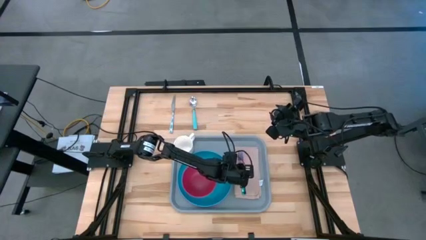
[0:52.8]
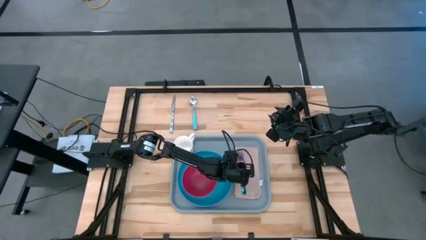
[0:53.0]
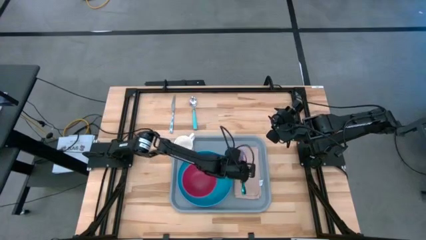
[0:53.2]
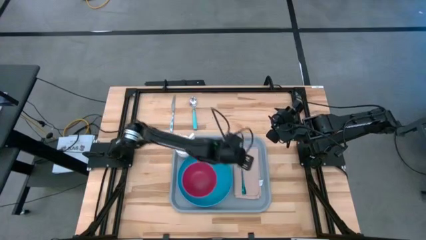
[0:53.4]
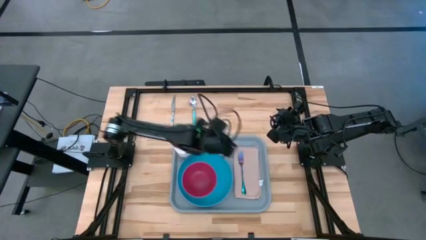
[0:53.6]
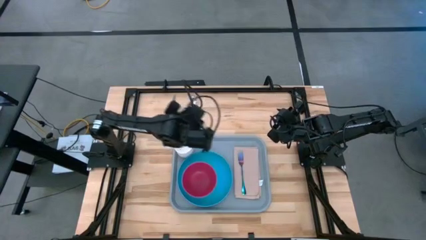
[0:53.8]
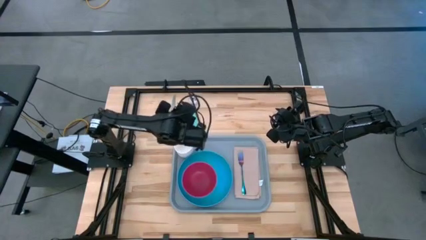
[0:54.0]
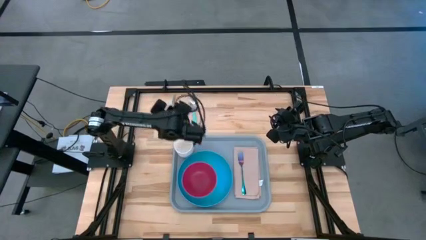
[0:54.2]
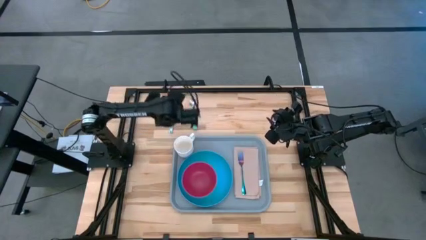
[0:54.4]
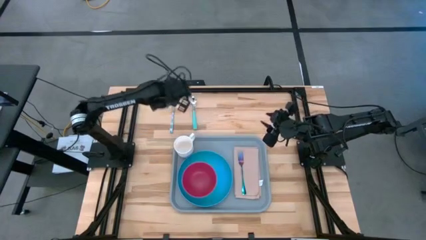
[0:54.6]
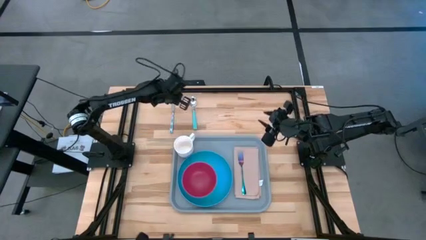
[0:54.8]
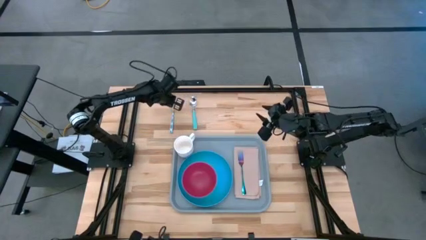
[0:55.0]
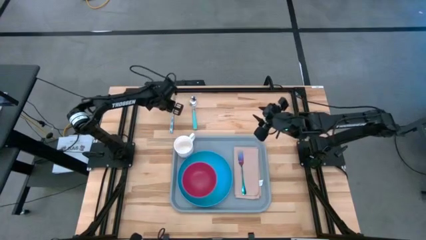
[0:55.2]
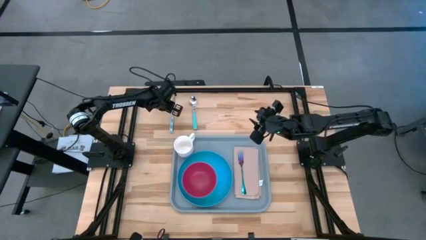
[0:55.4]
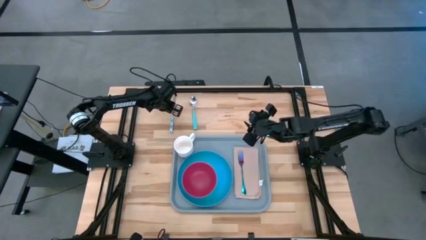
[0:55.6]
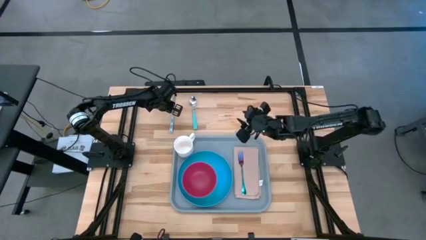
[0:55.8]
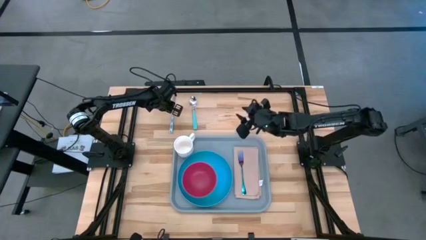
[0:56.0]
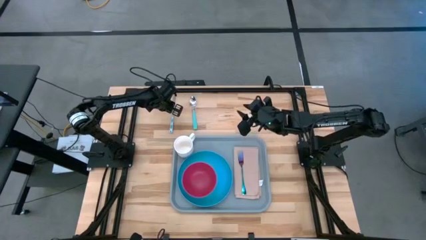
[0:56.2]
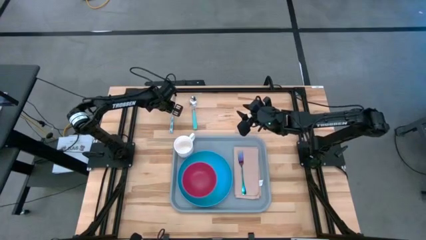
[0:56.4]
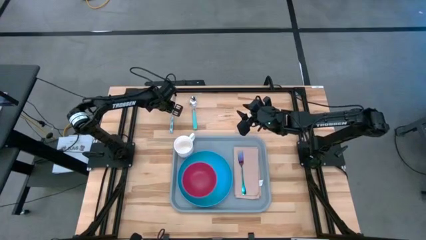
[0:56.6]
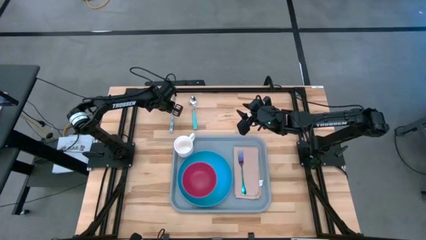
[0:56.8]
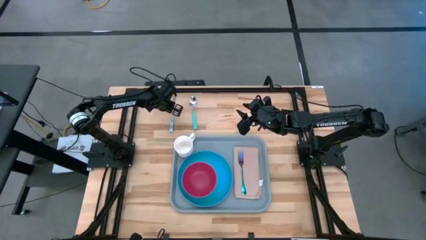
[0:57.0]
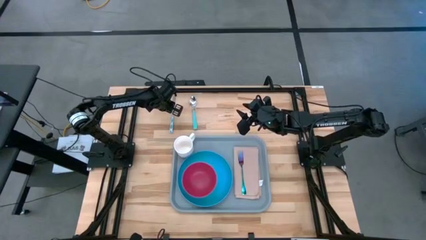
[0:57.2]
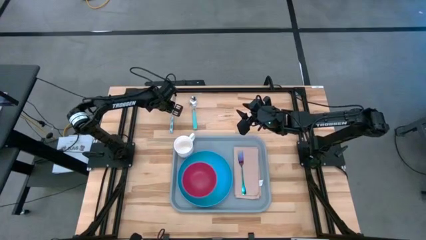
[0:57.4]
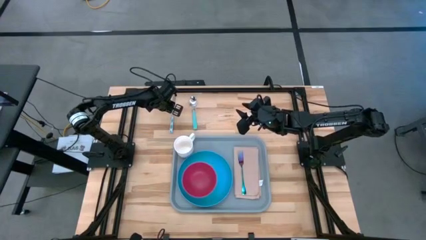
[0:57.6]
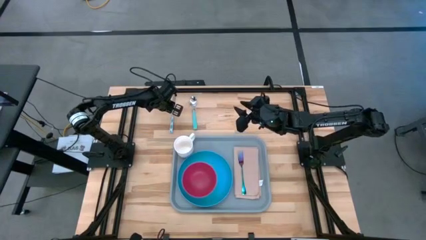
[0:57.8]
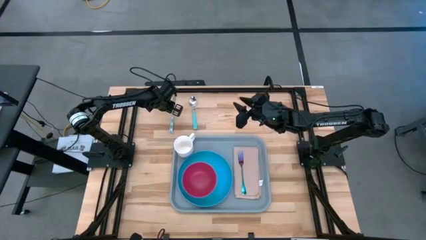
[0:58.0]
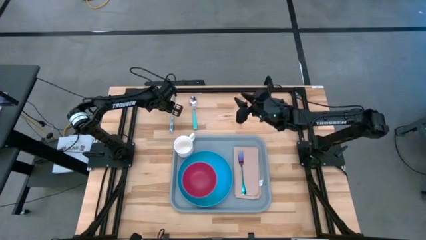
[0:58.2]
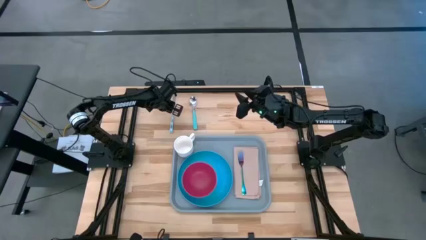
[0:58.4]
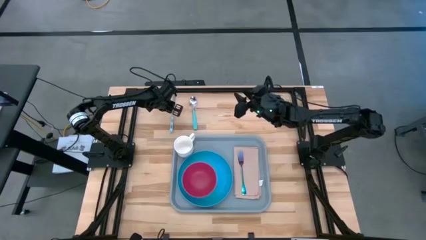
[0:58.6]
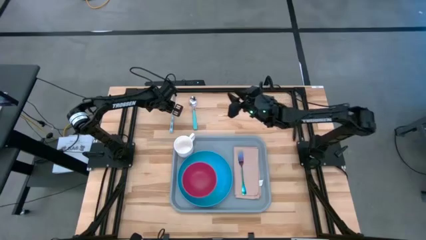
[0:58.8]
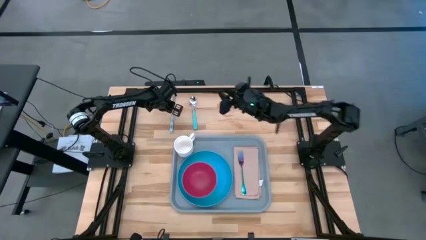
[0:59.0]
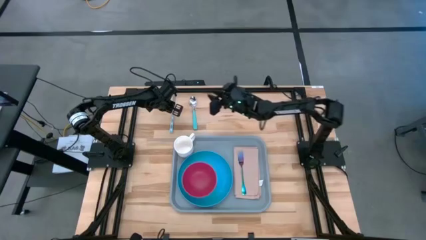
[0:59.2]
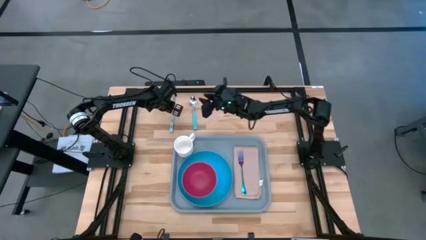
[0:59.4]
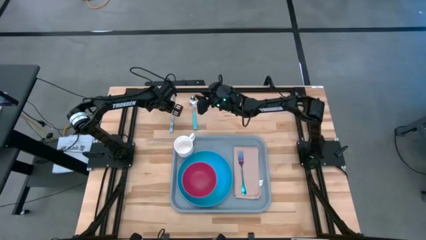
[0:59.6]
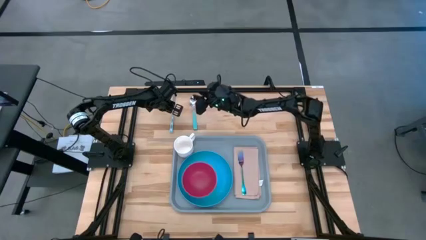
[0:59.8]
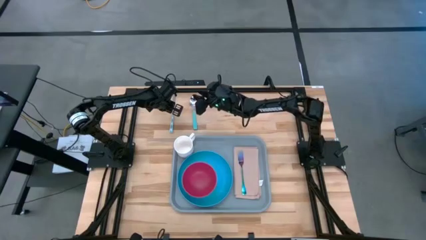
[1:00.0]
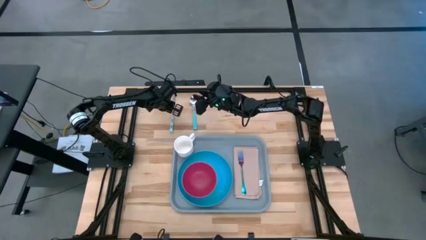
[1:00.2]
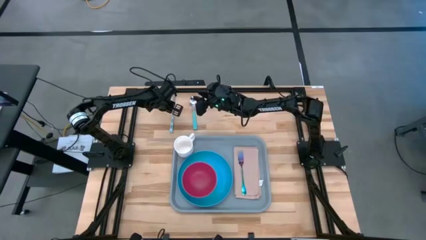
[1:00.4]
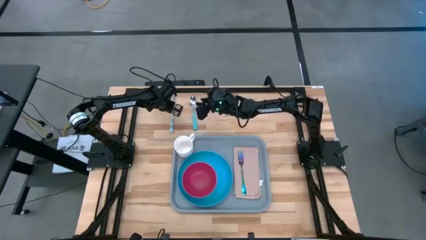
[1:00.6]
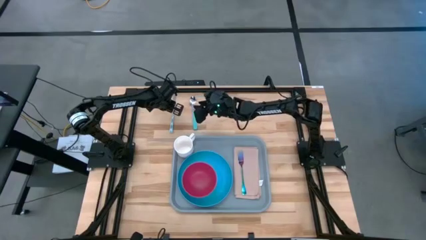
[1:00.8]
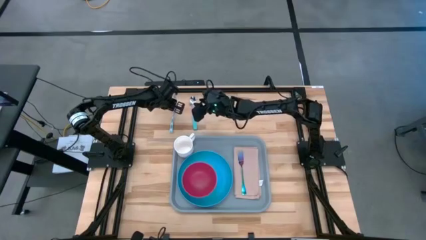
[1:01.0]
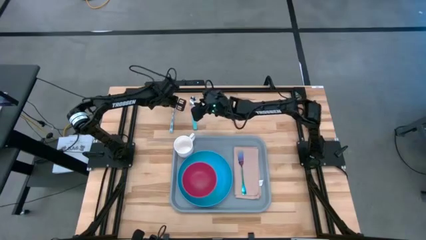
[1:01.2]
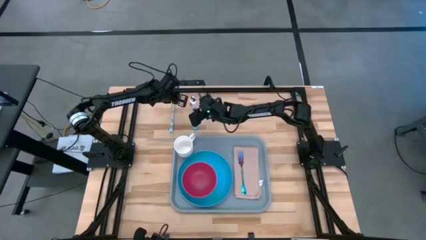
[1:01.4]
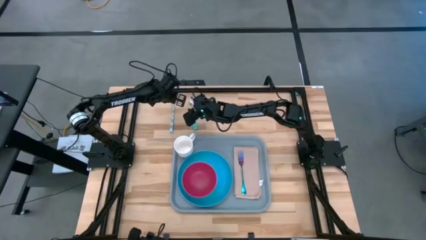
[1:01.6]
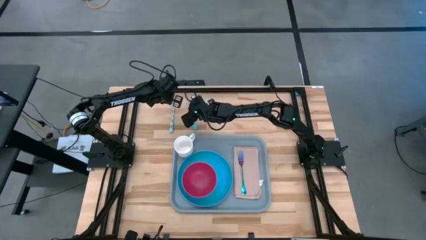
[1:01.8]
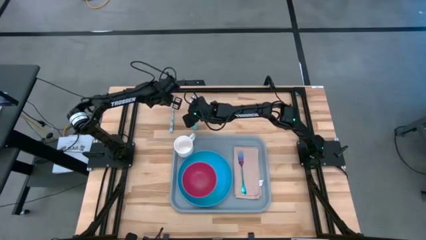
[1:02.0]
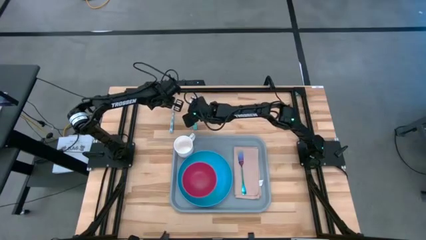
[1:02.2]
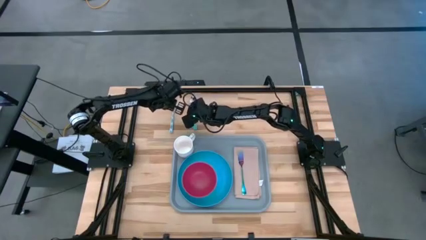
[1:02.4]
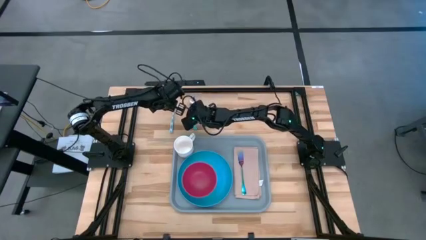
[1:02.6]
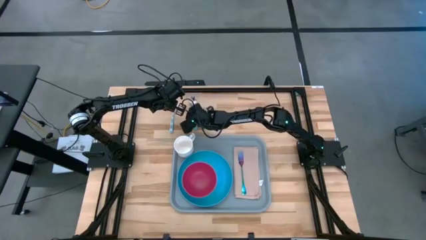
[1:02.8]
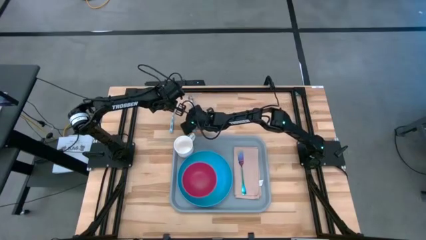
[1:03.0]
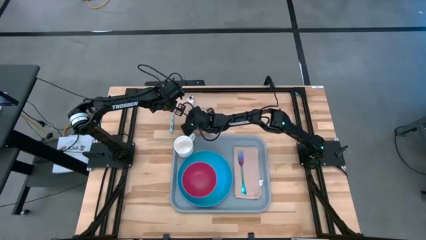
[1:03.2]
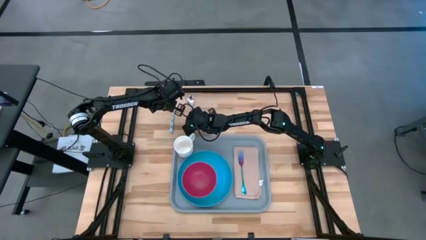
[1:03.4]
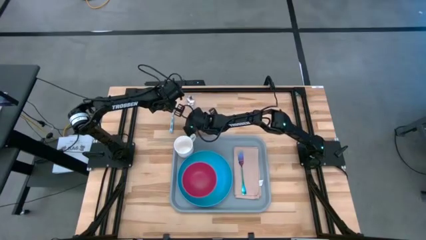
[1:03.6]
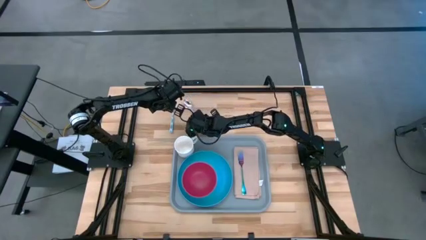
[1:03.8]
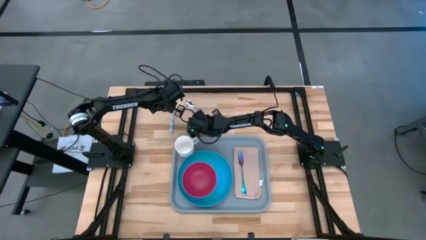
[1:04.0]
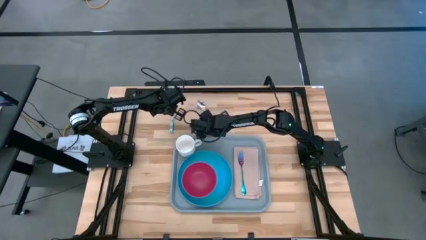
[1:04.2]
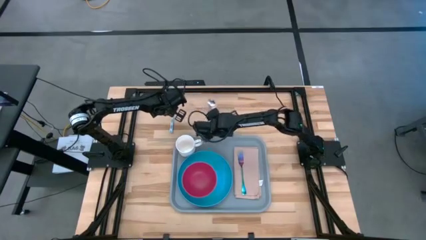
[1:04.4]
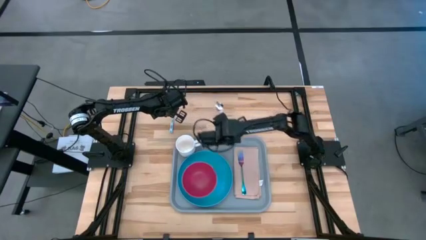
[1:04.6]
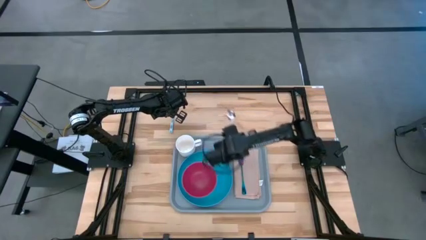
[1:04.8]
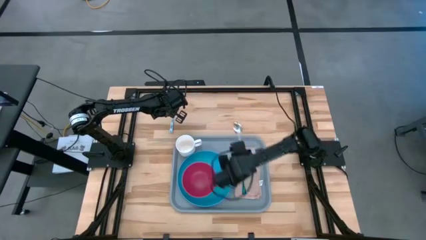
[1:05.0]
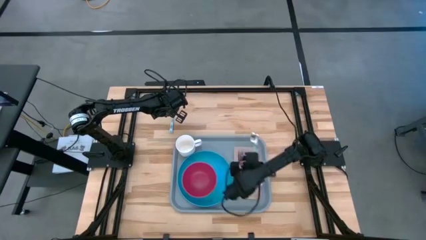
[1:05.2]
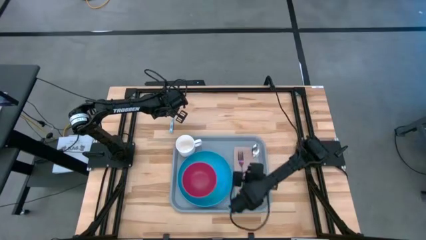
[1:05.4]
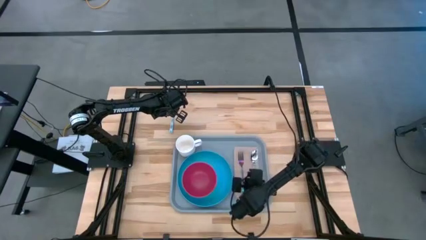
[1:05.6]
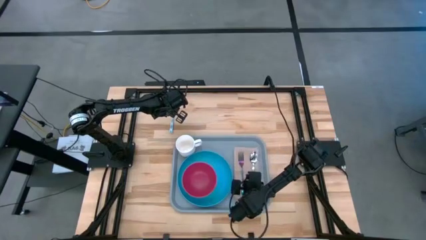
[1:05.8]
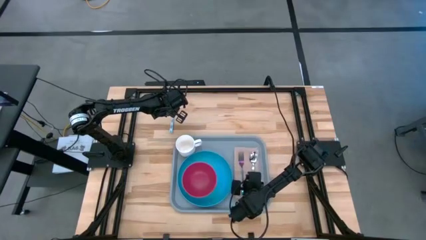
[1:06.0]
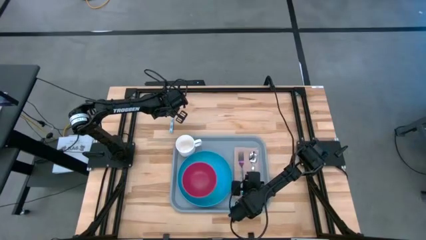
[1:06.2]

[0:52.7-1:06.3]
Task: Set up tray
Put the blue spoon on the gray napkin to the right of the purple fork
